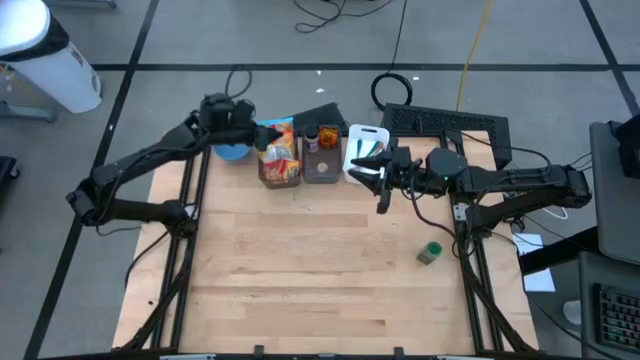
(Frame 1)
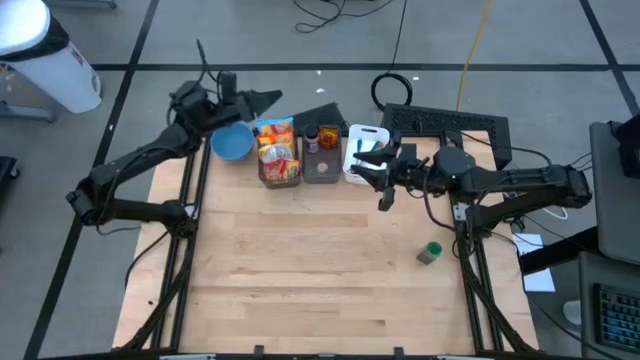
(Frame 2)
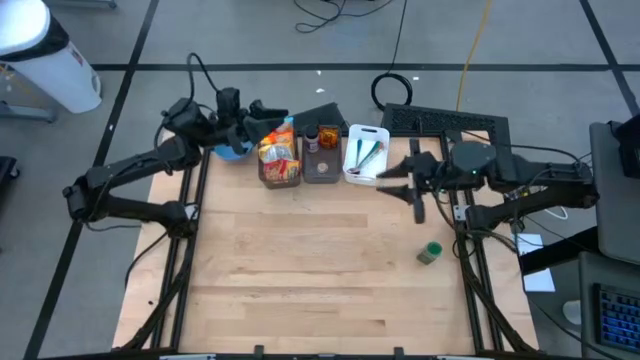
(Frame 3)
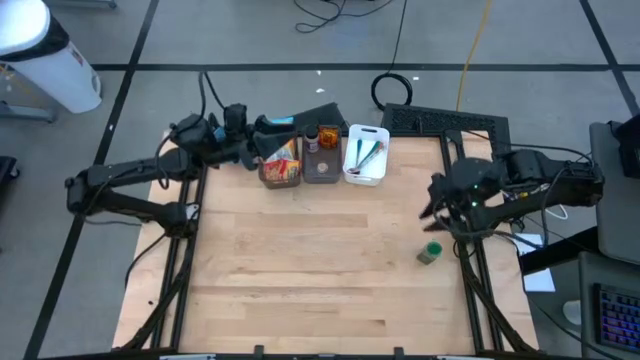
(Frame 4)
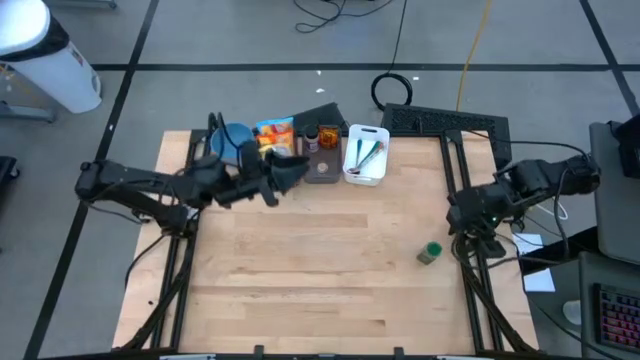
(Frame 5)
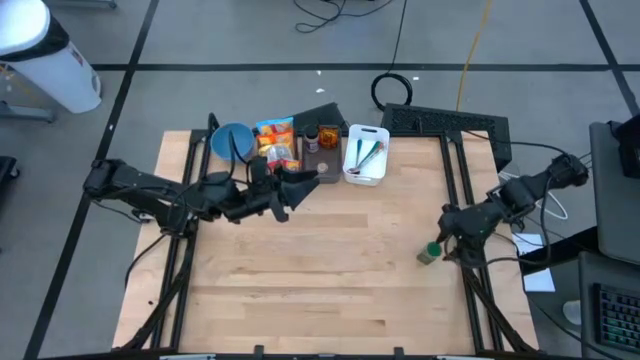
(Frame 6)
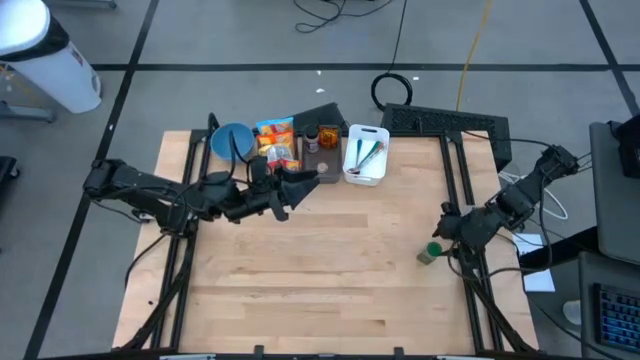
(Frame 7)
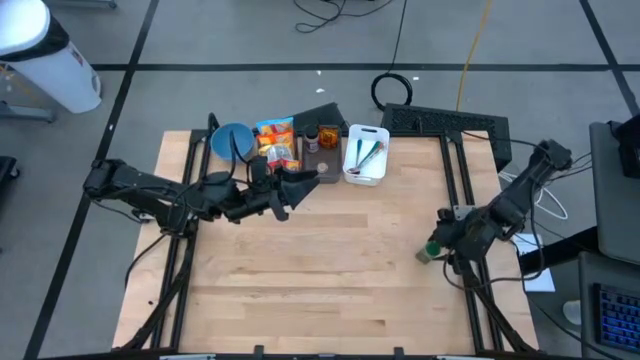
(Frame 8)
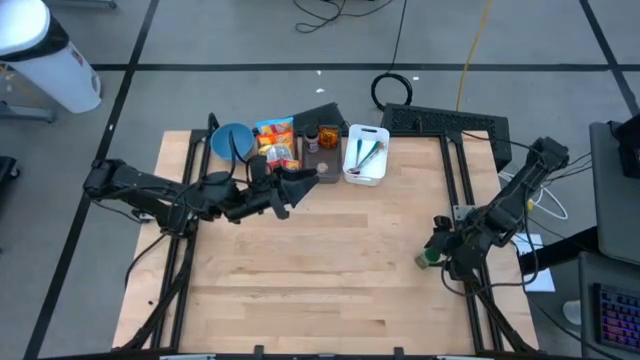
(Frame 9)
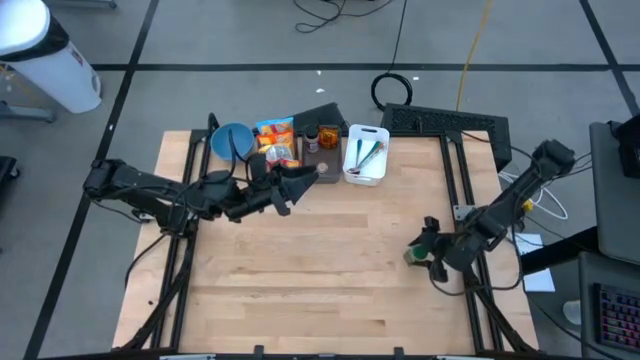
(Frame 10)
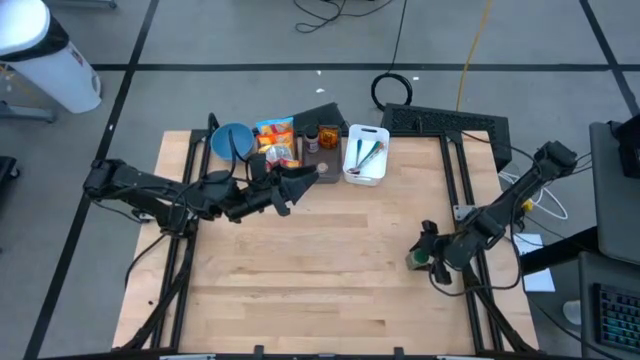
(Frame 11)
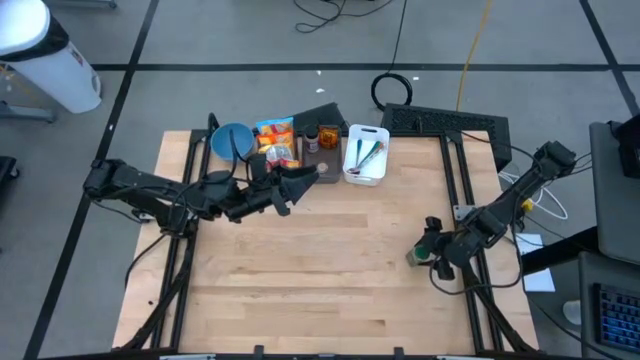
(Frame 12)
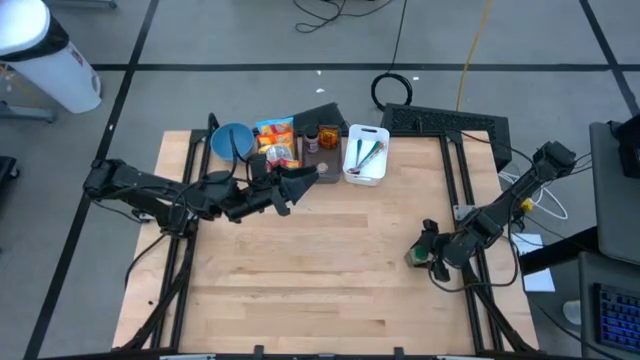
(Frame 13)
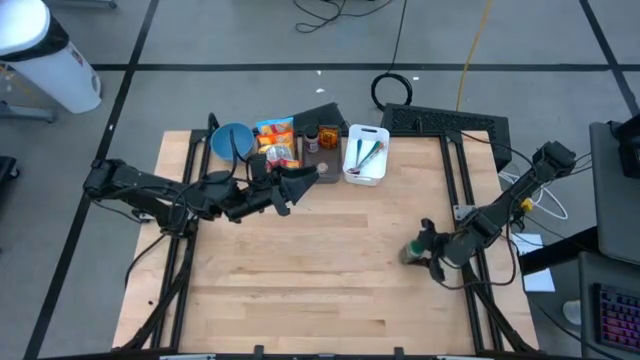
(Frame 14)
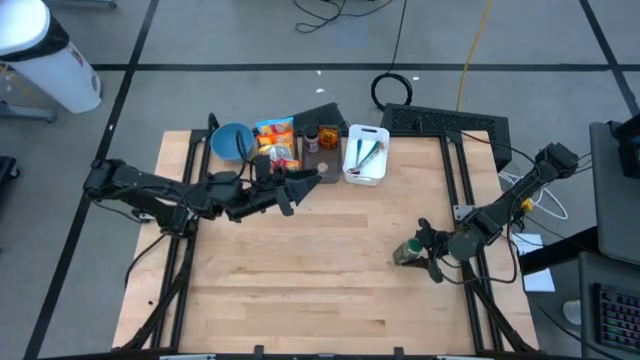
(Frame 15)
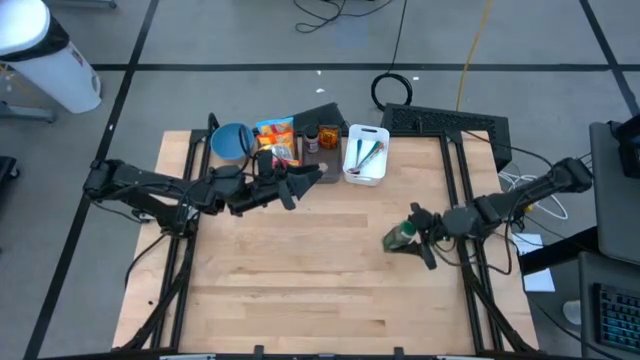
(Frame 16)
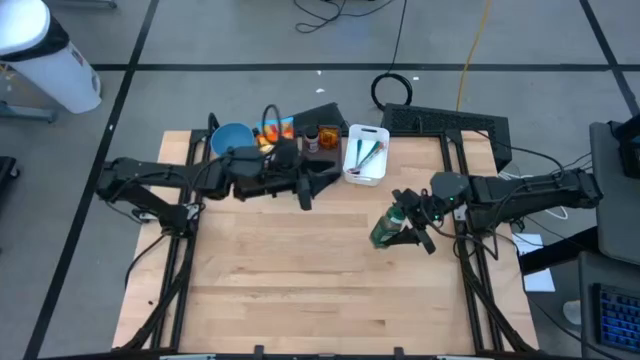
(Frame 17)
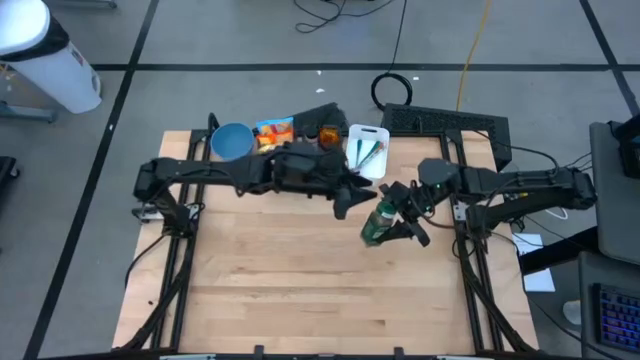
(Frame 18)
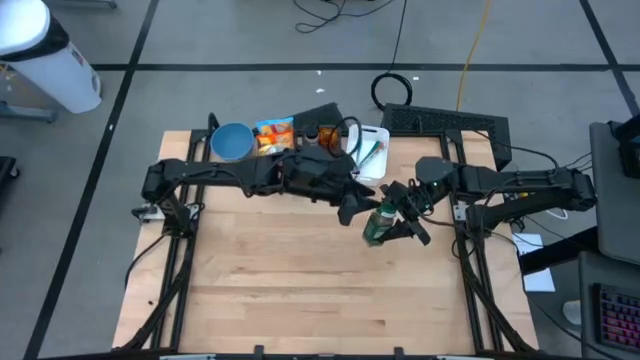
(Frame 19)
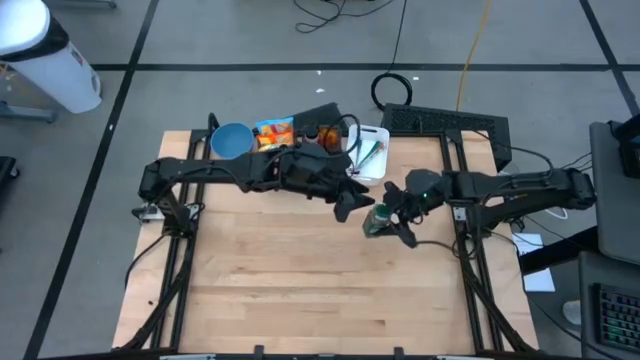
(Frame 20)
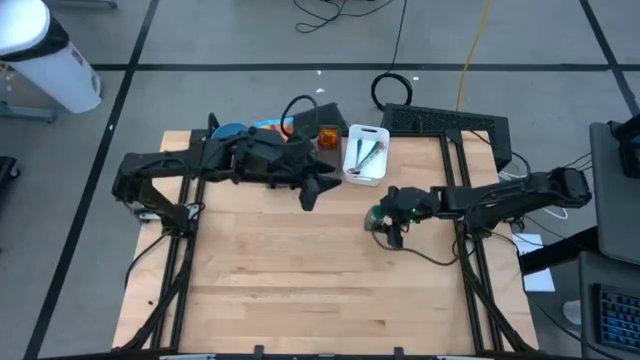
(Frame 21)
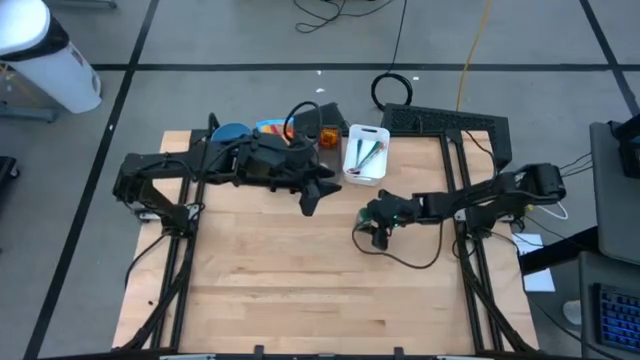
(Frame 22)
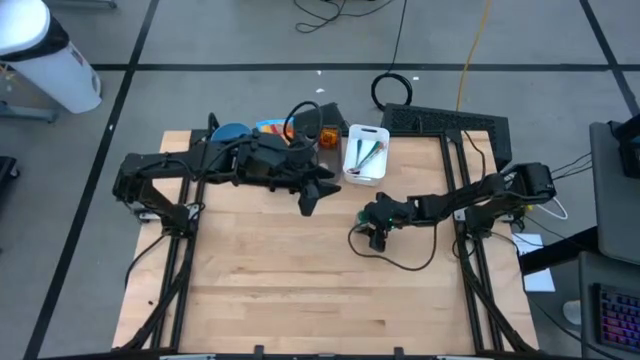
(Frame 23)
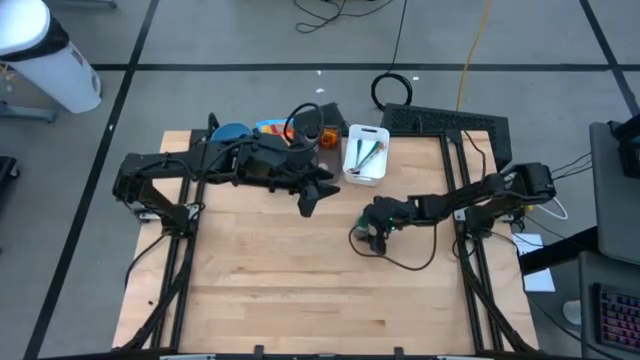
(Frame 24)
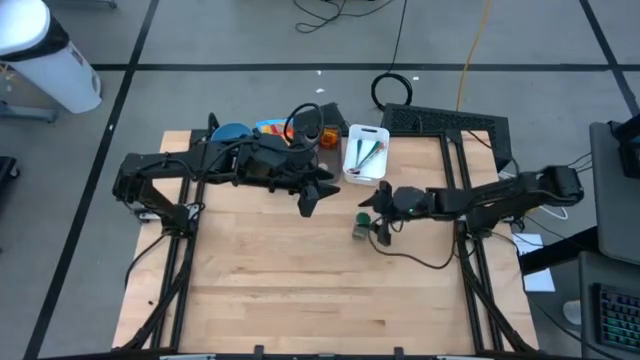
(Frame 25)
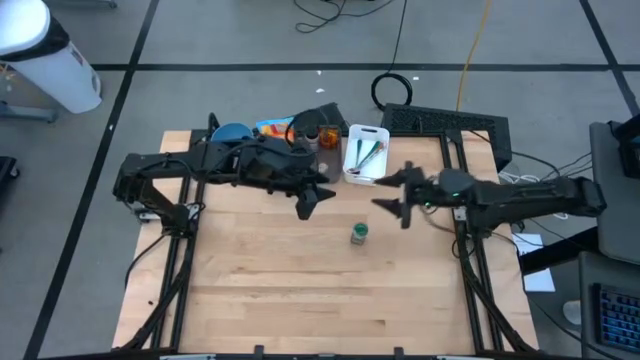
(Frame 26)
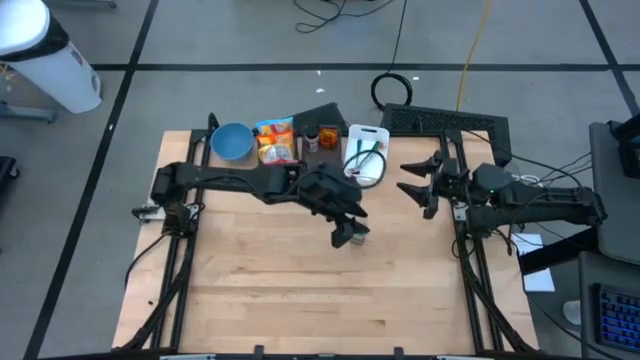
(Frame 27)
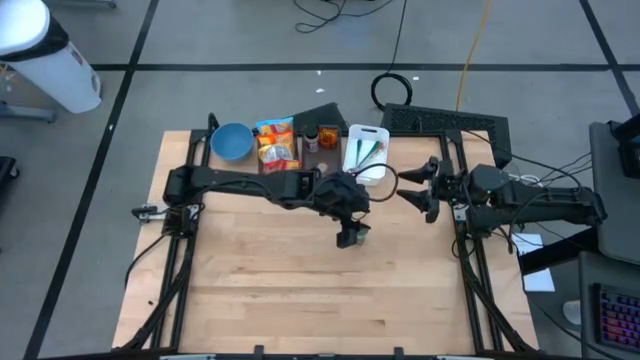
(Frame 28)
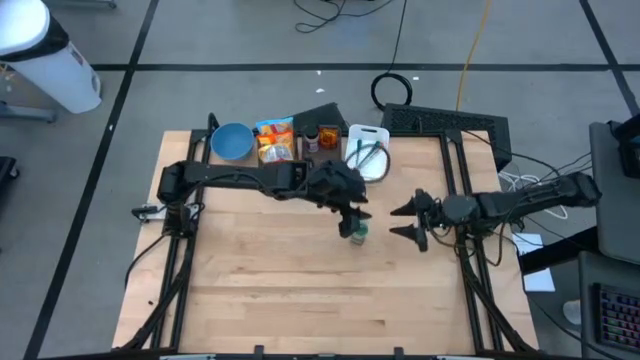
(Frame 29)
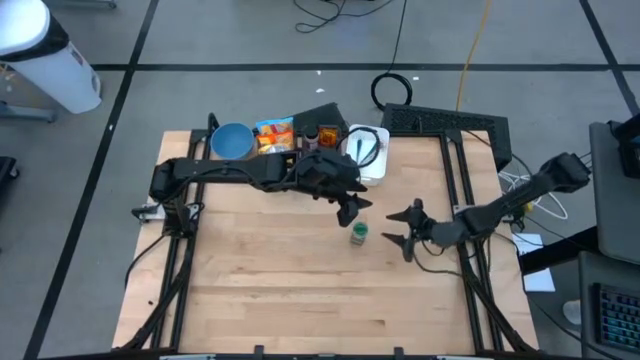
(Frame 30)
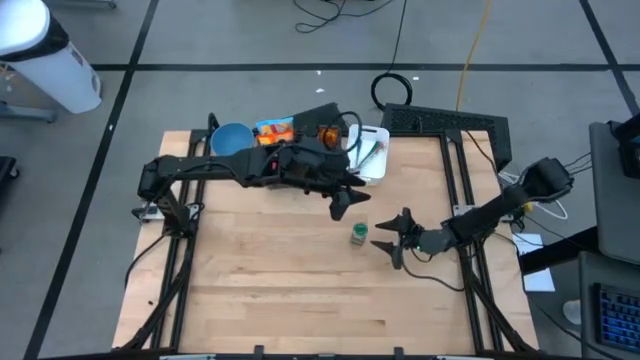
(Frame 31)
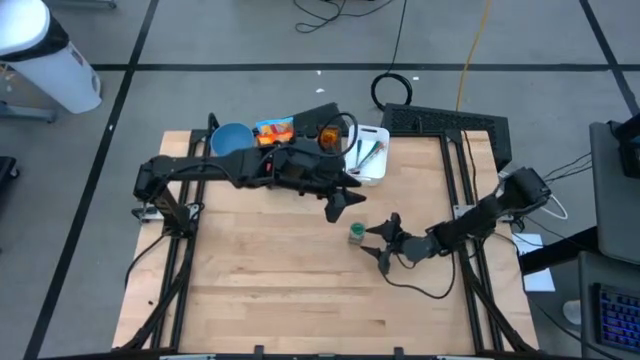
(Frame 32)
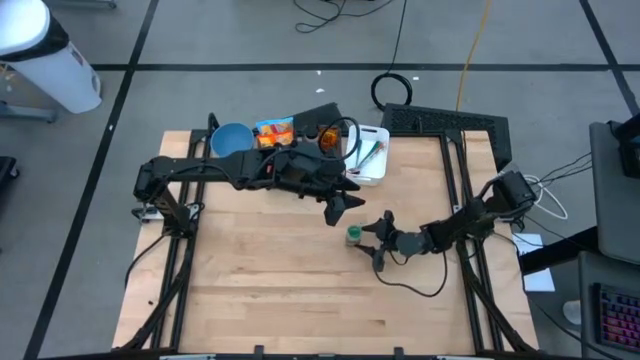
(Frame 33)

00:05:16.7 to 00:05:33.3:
Task: Pick & Place Food Item
Put the green seasoning bottle into the right black bin

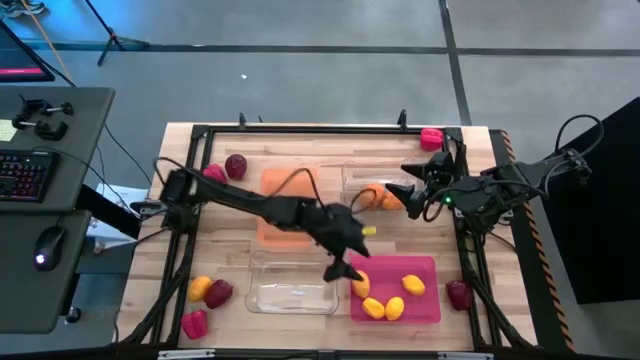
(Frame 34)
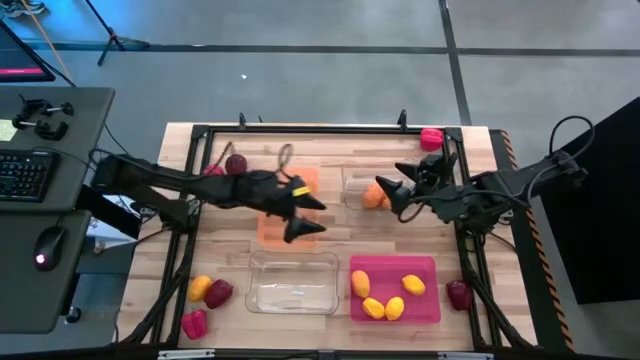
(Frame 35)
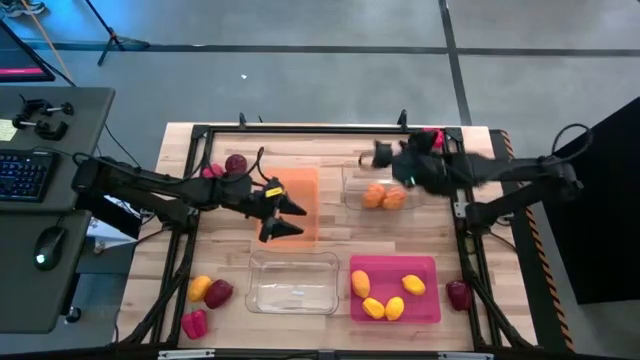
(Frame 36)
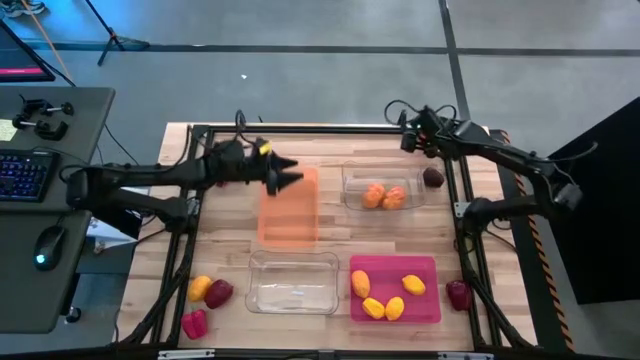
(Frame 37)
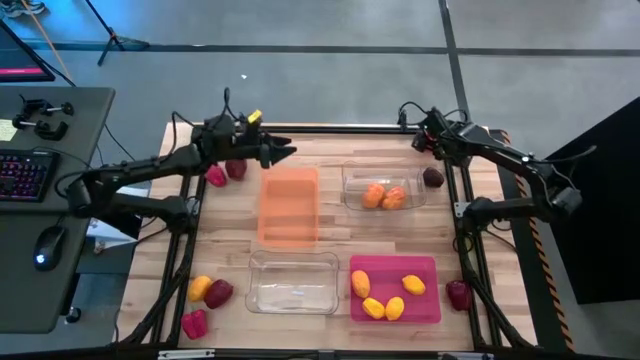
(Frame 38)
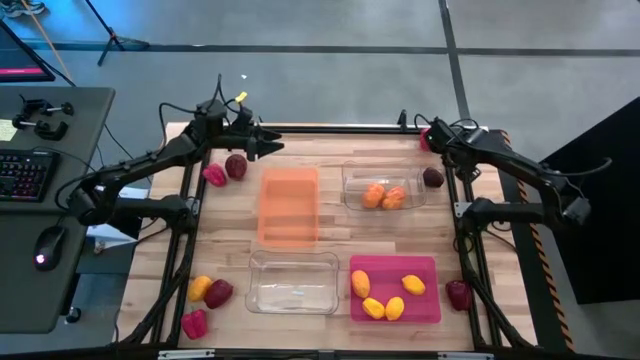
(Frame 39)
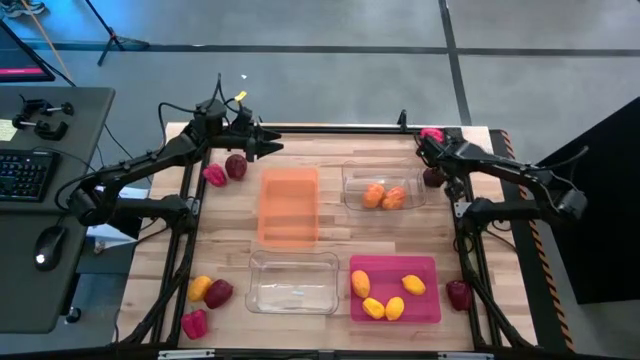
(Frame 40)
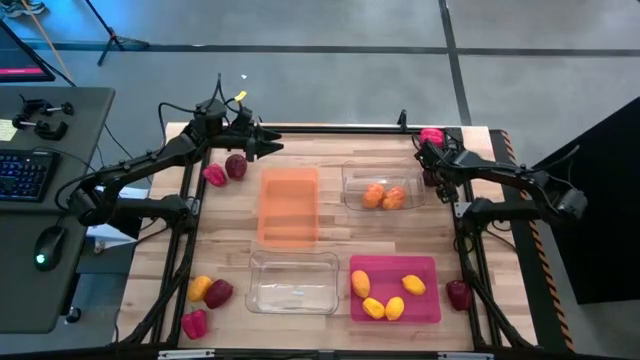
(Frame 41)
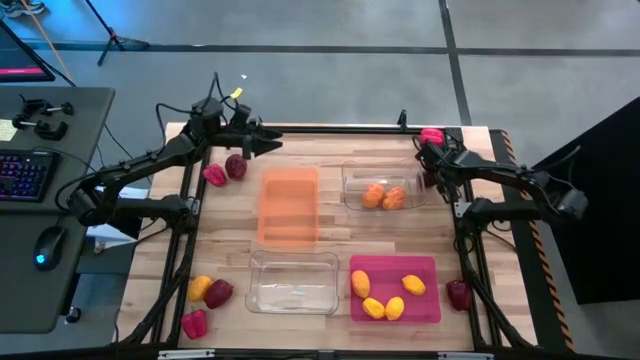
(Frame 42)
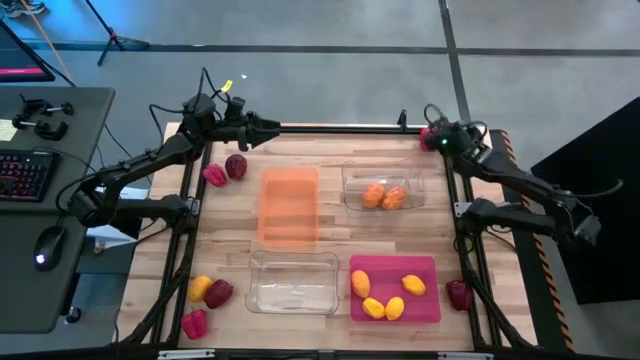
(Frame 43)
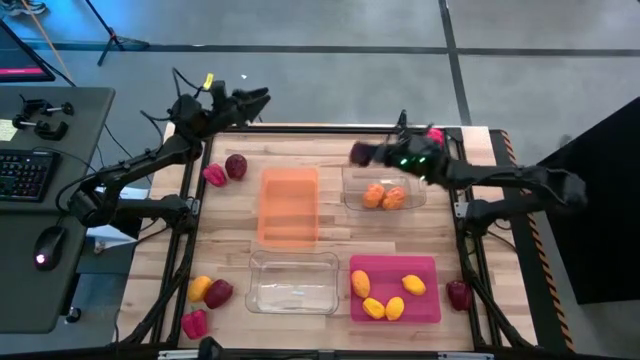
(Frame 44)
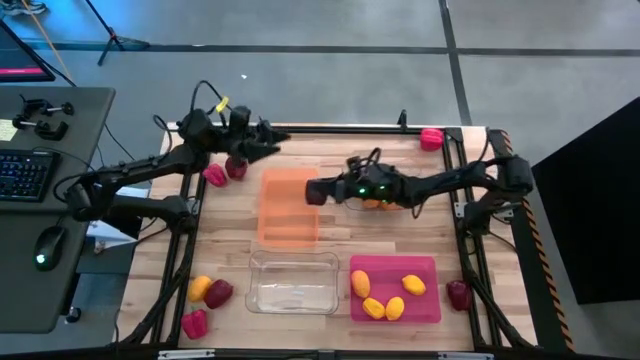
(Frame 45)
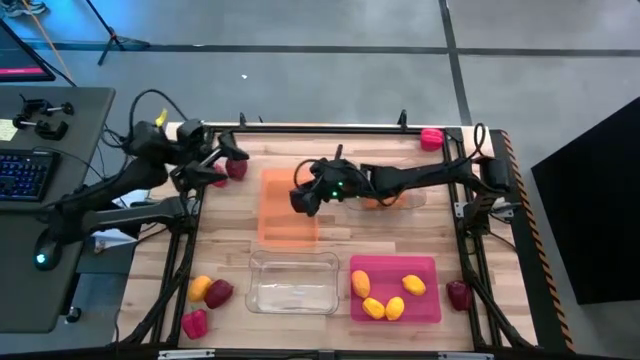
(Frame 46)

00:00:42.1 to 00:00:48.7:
Task: Sort produce into baskets
Put the top right apple into the orange bin
